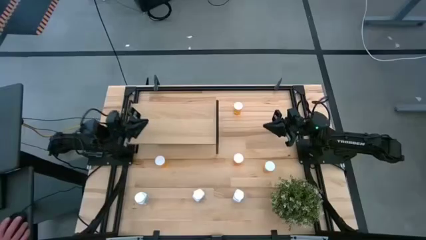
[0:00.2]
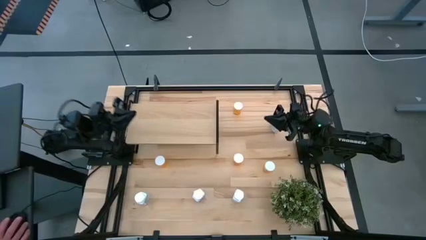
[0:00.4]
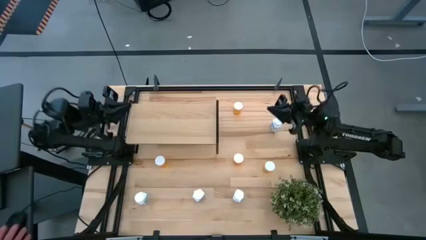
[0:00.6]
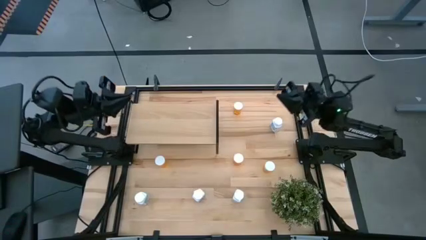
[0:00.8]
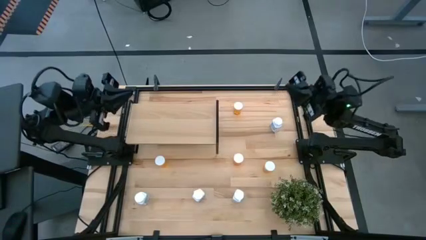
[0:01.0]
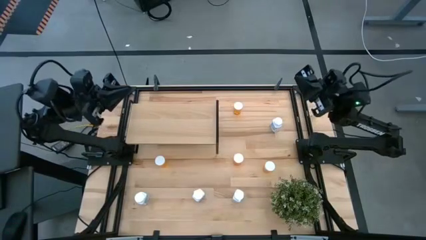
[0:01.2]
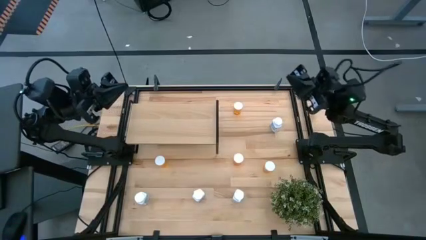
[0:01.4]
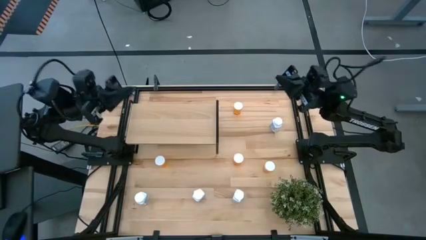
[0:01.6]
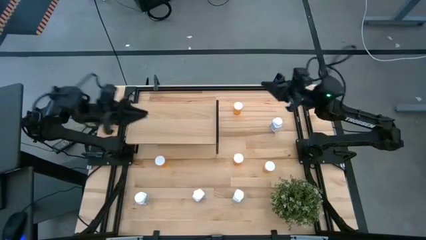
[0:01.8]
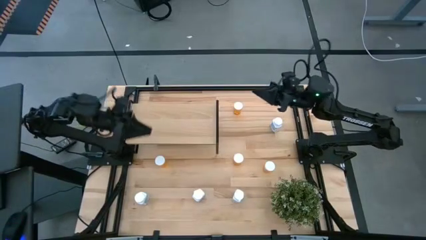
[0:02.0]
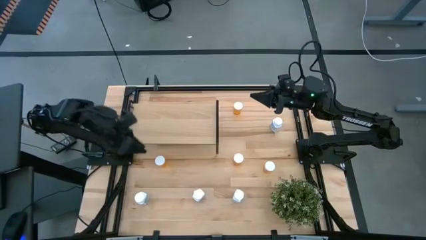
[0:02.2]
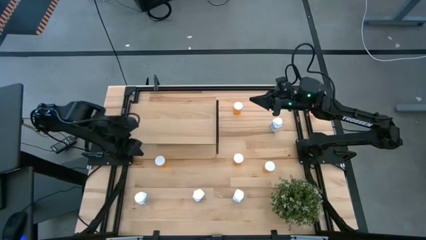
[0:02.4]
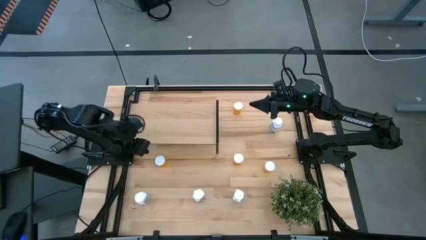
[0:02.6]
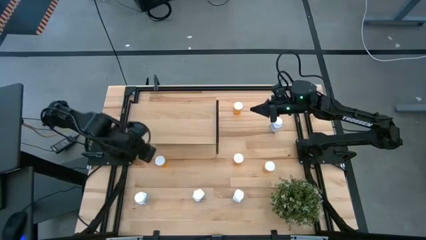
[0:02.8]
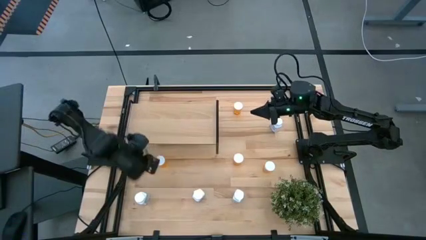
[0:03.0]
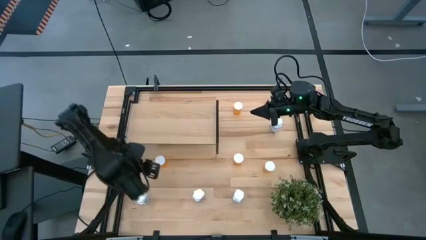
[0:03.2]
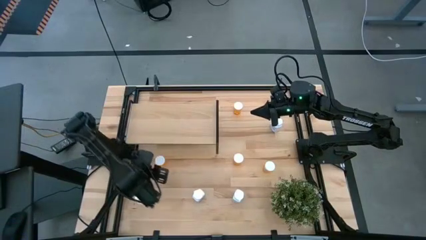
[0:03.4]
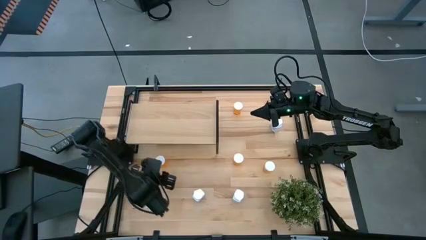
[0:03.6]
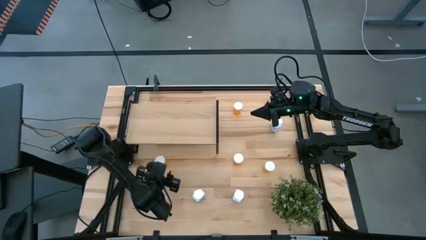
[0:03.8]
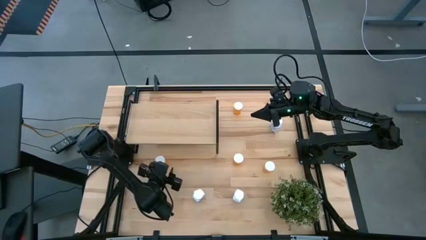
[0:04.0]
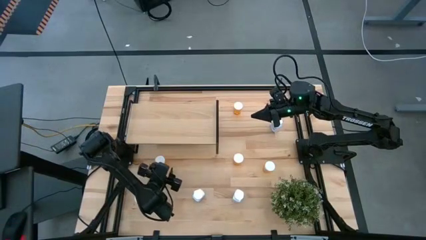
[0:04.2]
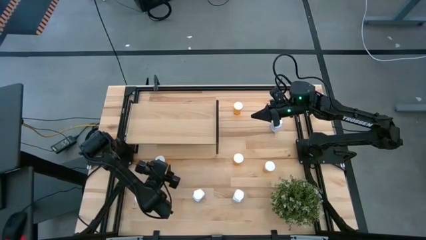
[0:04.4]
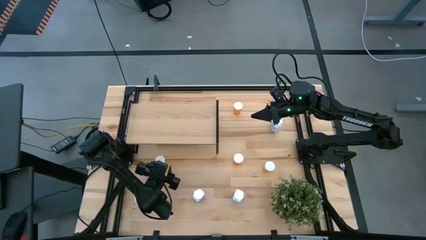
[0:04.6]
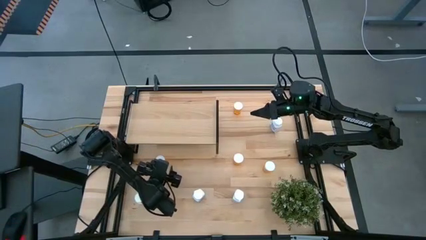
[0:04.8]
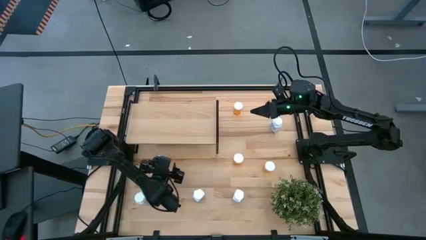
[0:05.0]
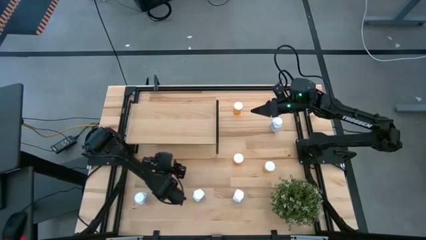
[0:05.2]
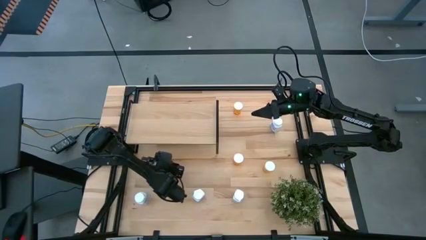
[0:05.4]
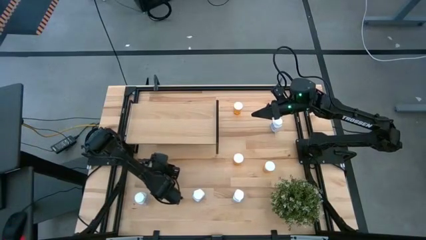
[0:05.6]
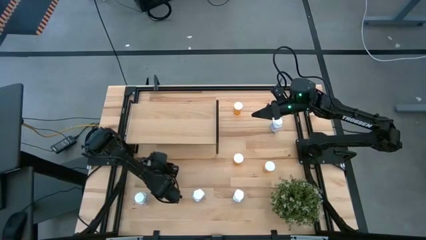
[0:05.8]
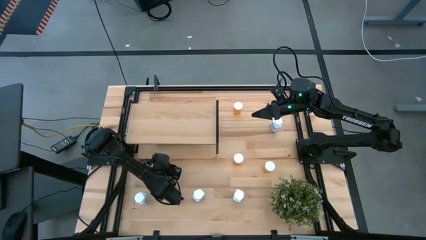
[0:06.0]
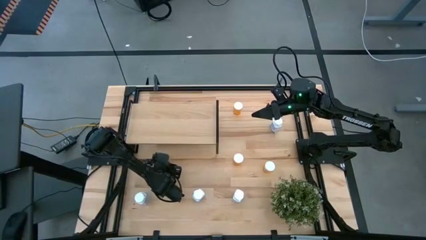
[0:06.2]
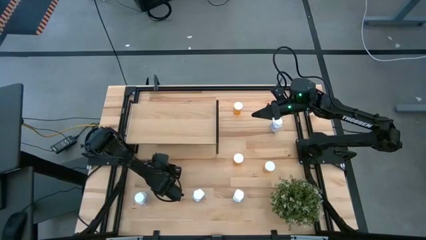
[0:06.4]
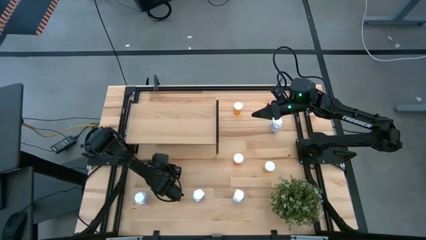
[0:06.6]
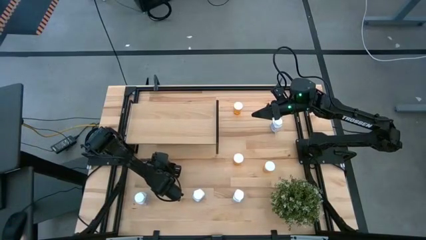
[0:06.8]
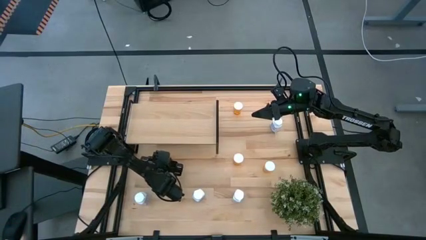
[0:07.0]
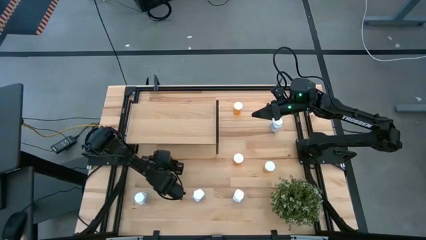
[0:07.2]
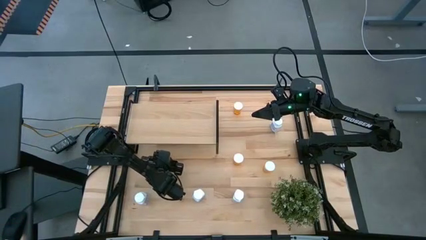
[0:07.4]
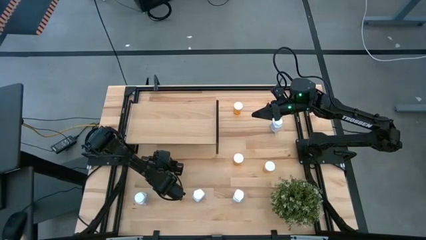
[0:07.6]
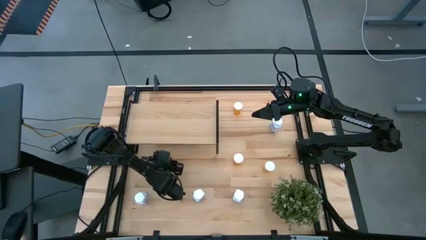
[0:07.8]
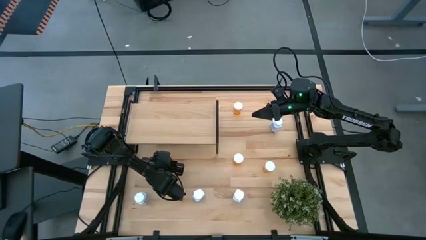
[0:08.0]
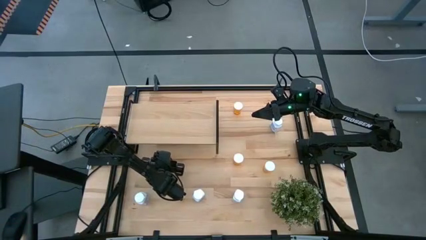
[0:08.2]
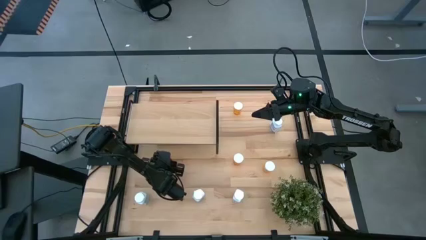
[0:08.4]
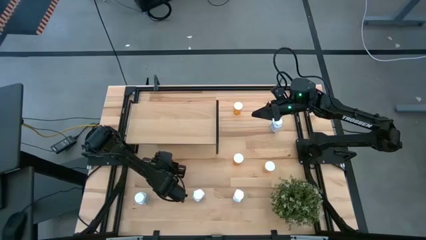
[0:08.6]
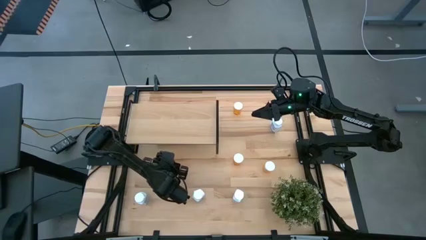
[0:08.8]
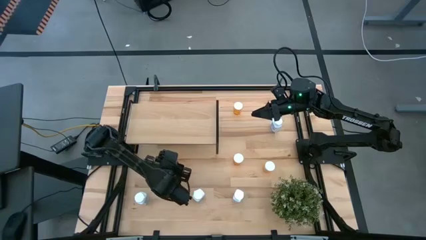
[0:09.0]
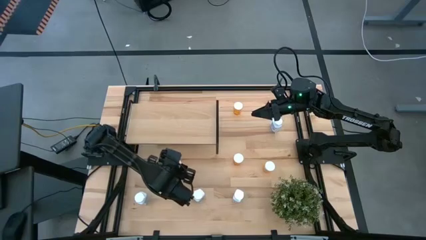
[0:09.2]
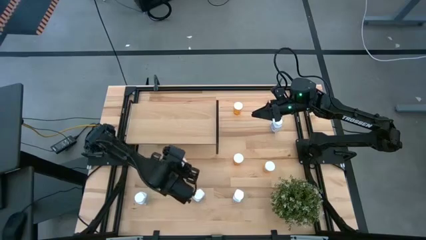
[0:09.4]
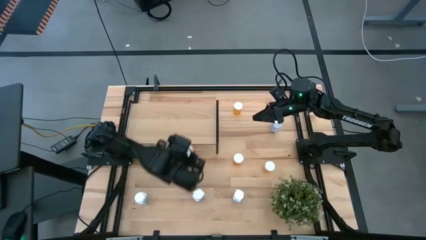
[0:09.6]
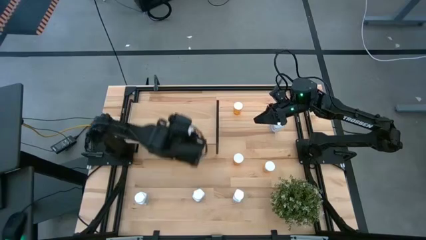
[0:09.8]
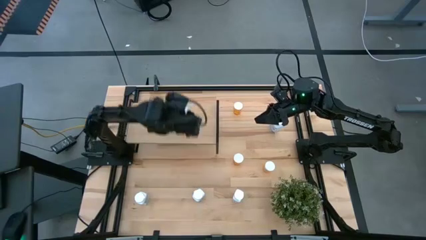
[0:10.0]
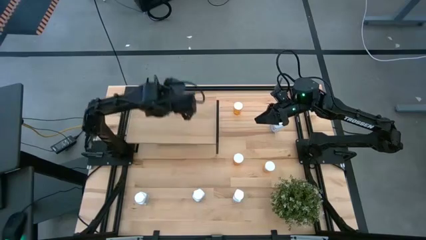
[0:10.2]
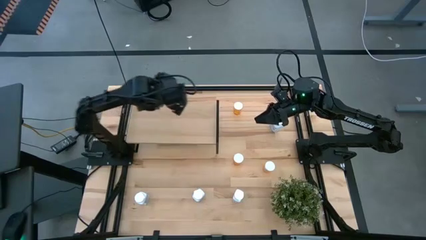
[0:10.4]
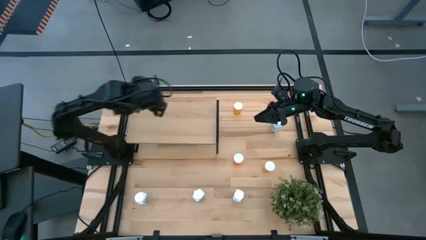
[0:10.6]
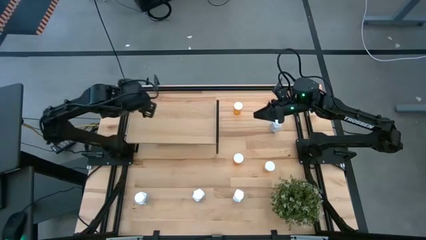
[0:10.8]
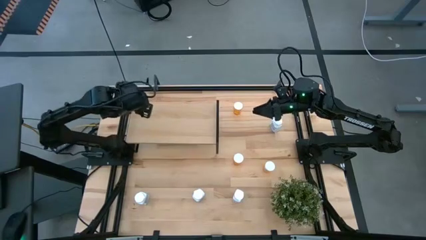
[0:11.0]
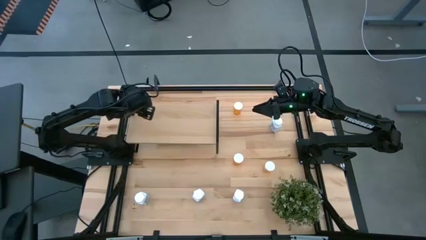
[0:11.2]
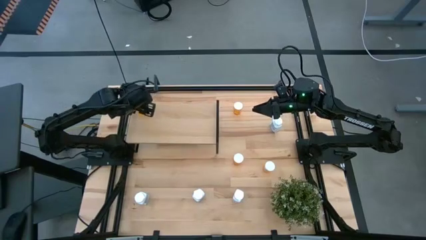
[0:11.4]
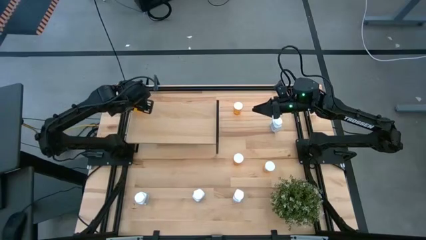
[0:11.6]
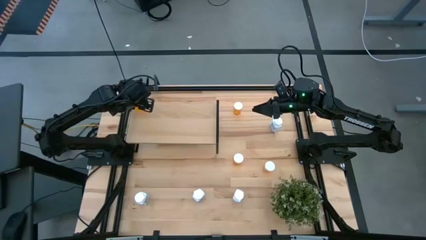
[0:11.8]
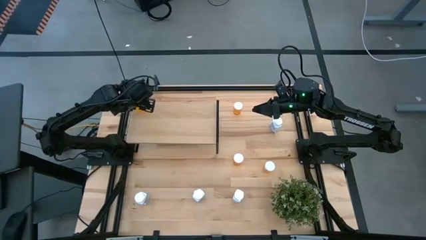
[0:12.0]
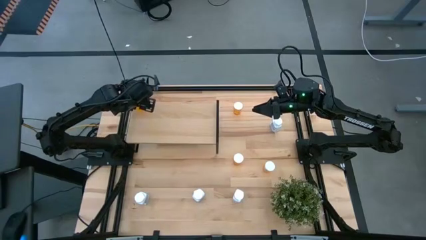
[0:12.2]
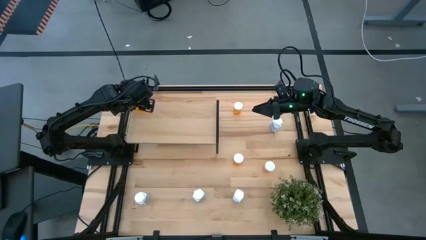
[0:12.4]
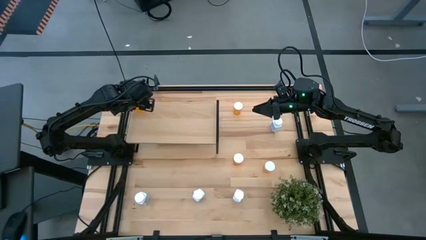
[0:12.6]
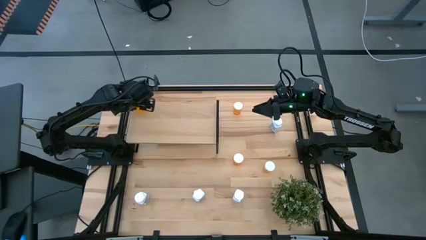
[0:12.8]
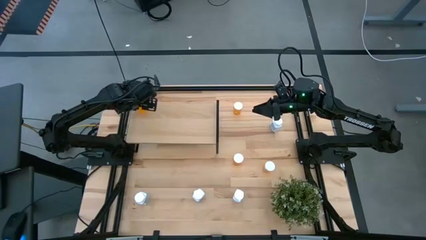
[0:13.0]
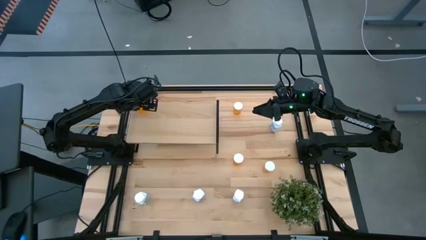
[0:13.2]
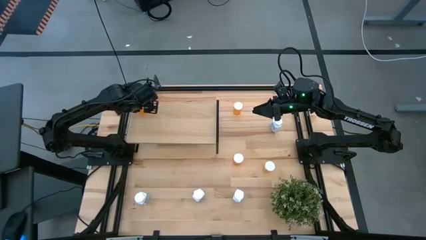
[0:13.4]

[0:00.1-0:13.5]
Task: Pick and place medicine bottles onto shelf by color
Put the orange pill bottle on the shelf
